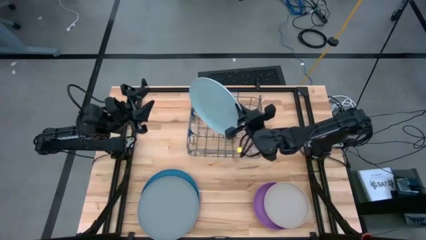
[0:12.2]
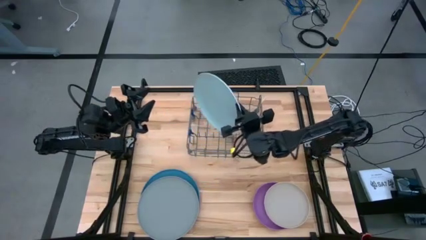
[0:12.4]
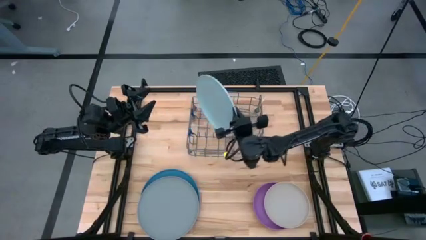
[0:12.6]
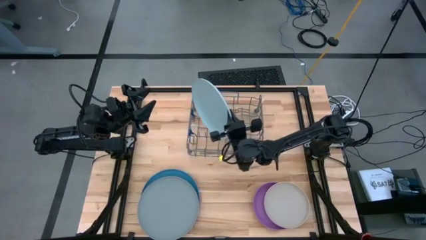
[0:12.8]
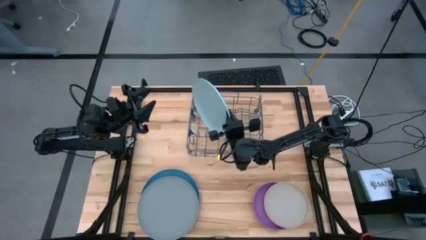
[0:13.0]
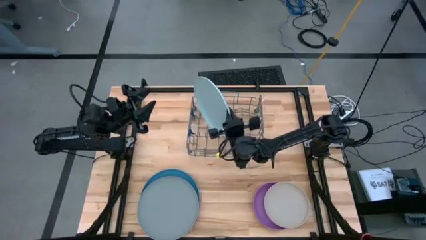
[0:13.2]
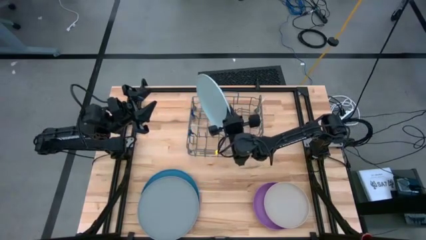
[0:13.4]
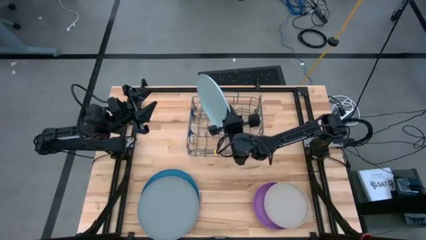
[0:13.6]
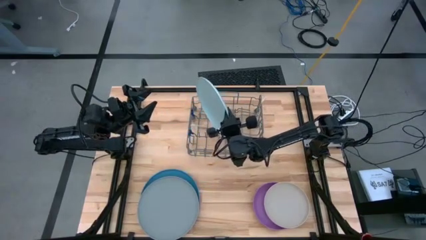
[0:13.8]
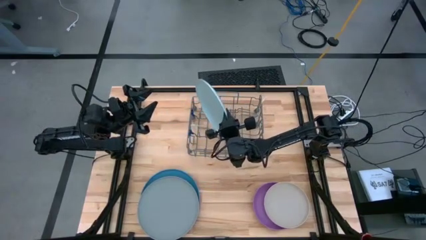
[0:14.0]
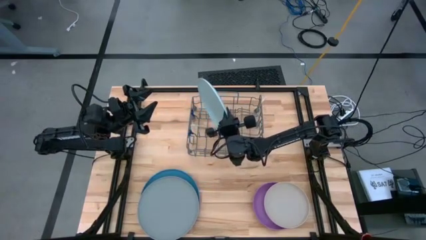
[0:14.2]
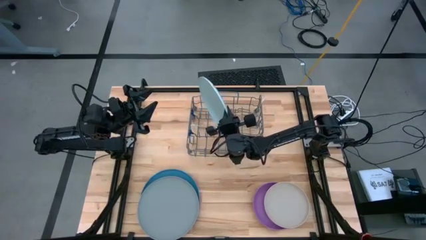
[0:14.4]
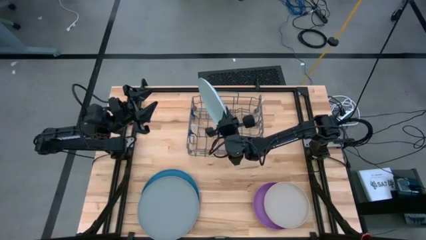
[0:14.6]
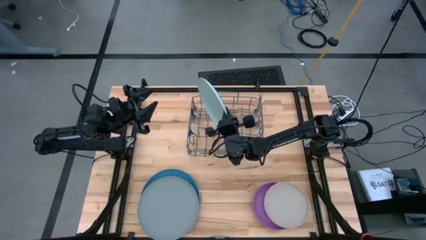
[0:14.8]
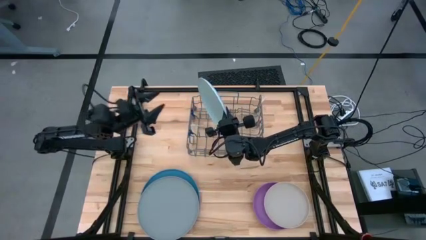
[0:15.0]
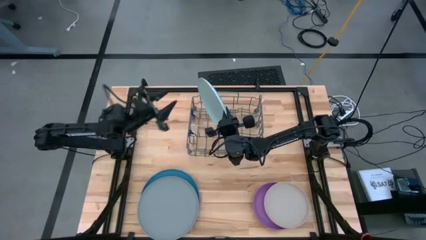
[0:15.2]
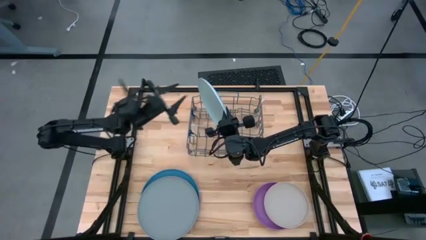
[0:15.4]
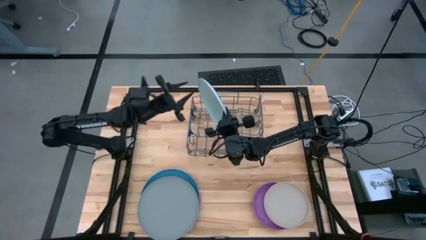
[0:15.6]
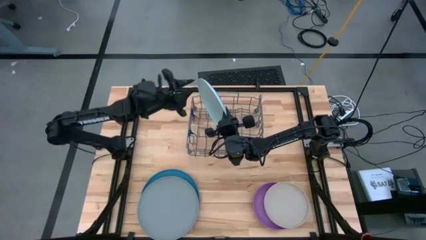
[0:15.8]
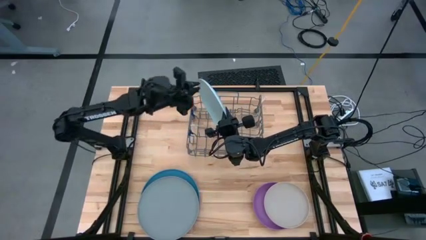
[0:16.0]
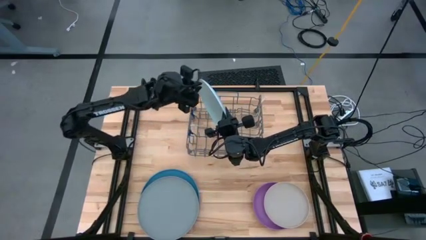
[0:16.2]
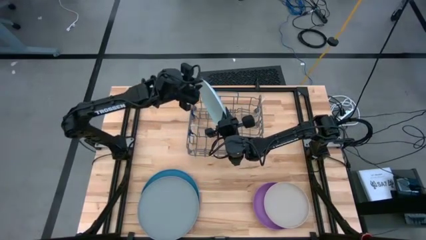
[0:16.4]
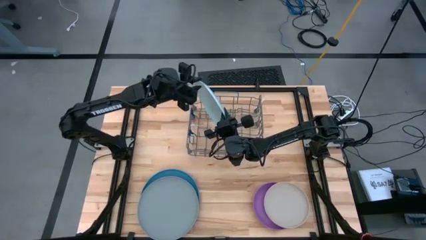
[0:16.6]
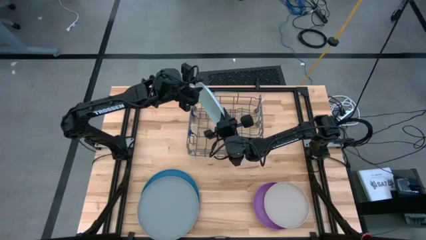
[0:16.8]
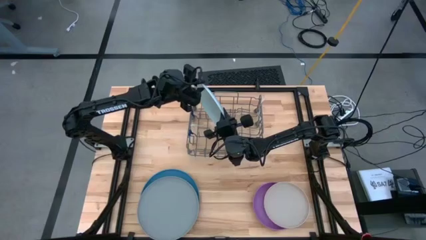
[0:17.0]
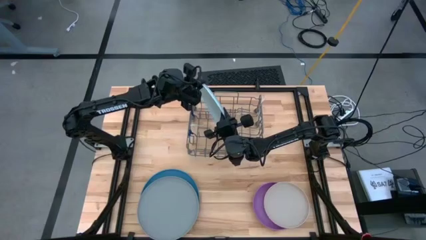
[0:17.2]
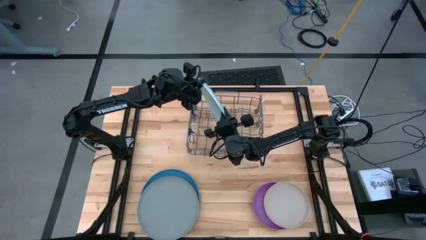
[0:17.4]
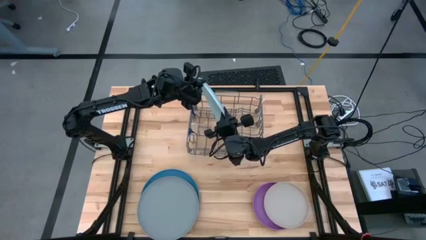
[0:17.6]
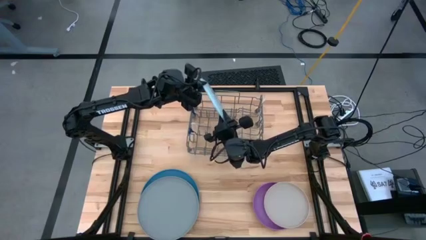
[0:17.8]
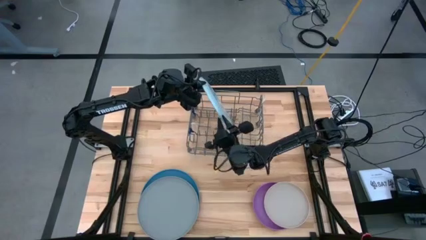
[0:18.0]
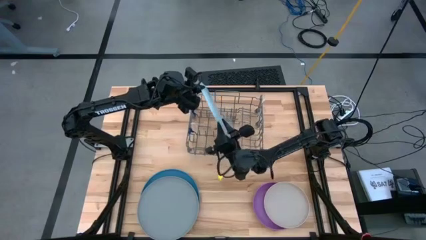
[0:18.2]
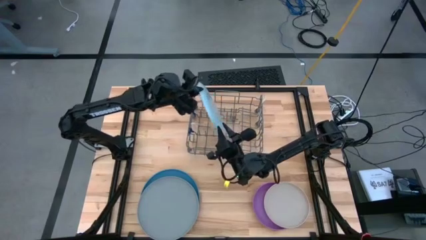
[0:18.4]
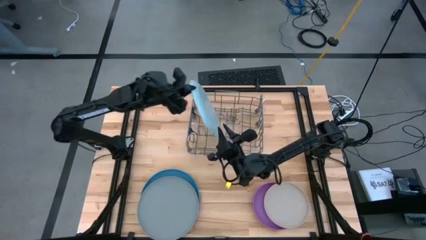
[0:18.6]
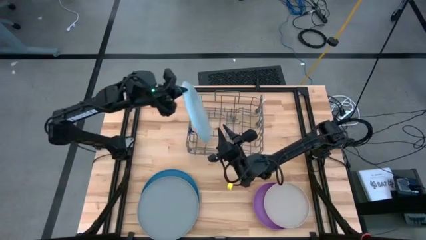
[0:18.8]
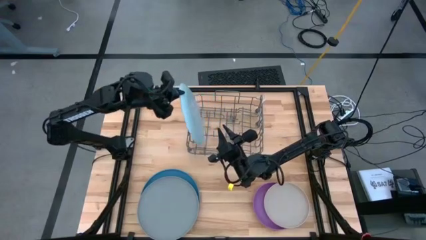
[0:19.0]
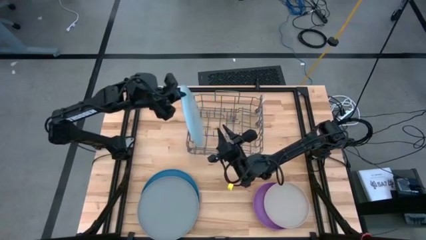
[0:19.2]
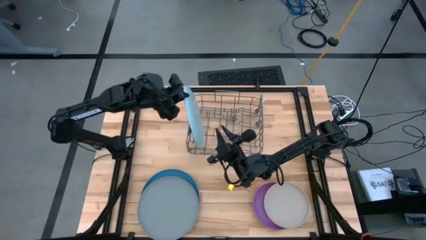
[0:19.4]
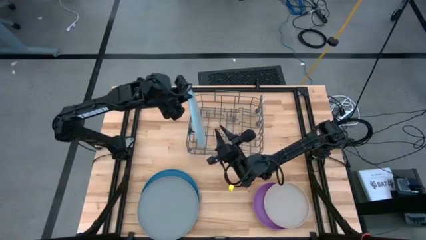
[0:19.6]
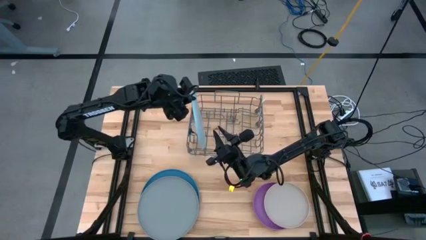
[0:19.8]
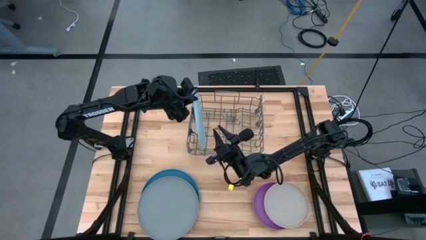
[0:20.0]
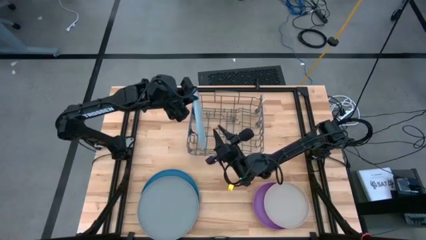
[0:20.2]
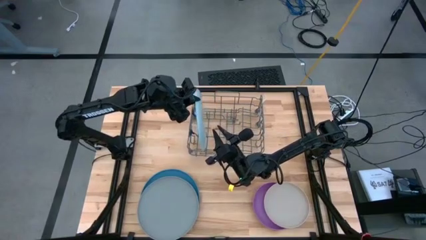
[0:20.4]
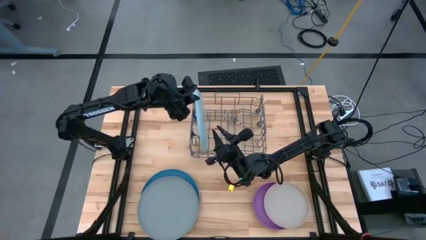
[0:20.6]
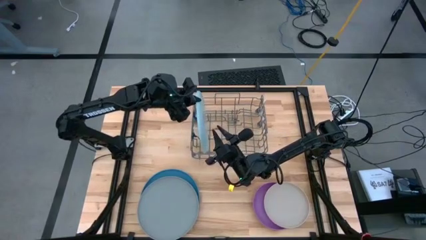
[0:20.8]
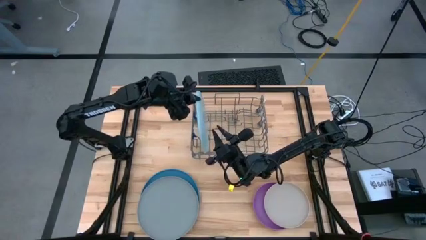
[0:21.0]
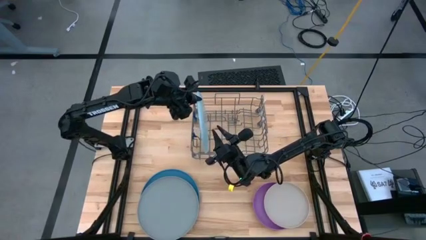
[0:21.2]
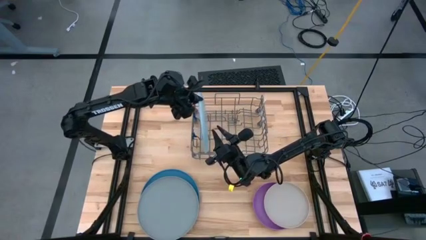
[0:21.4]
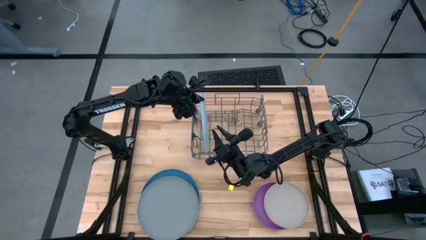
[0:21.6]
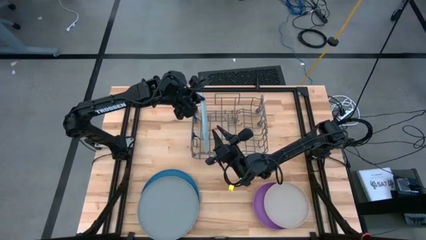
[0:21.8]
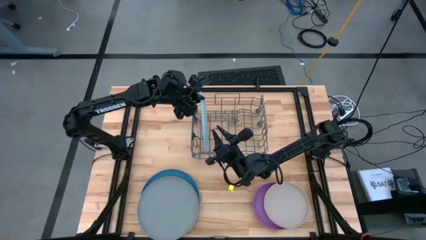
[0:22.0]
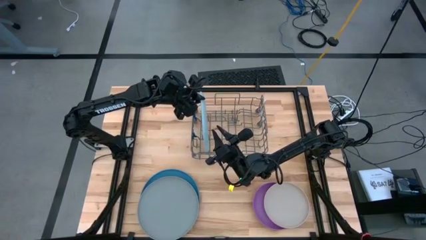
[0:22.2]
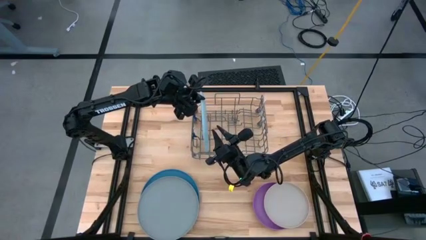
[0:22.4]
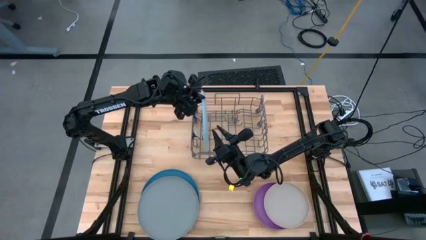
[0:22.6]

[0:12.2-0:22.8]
Task: Sort dishes
Put the light blue plate into the dish rack
